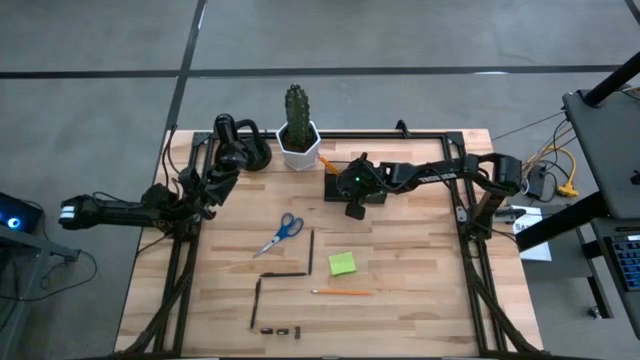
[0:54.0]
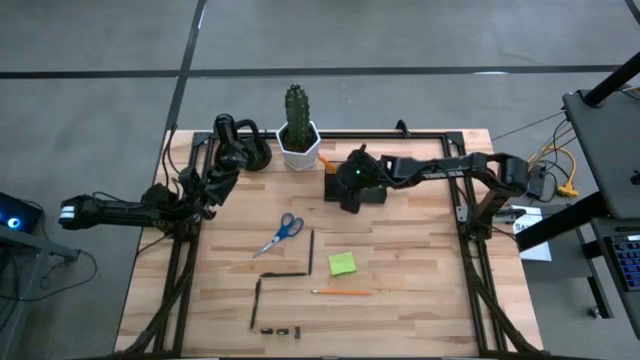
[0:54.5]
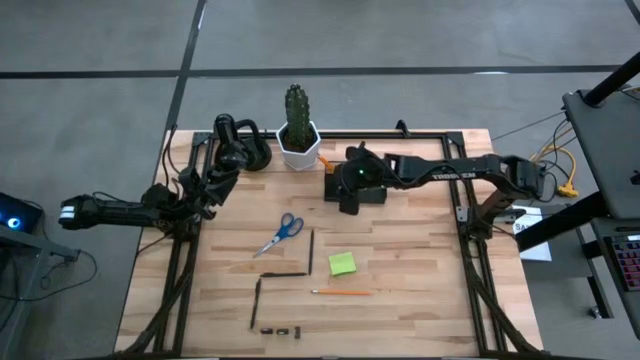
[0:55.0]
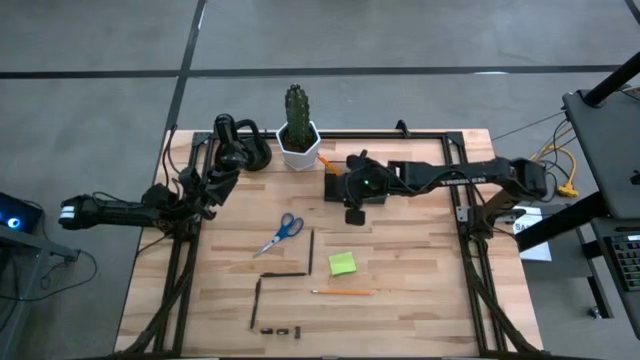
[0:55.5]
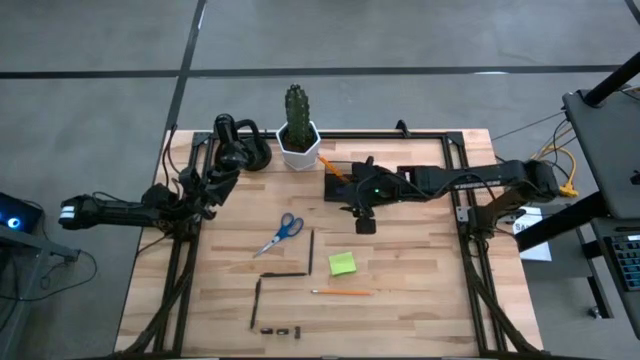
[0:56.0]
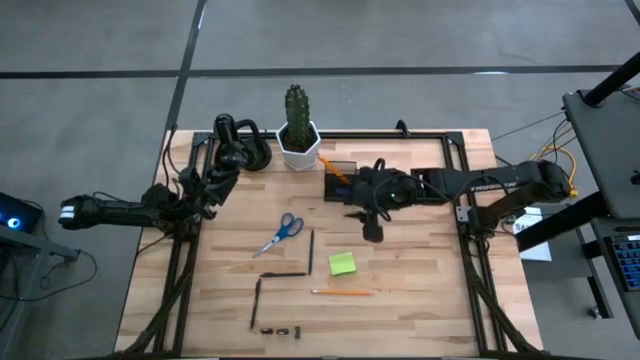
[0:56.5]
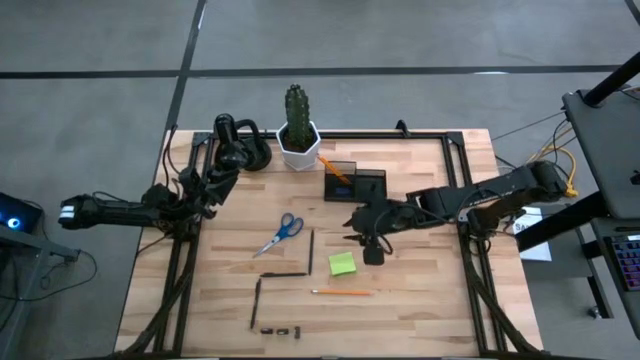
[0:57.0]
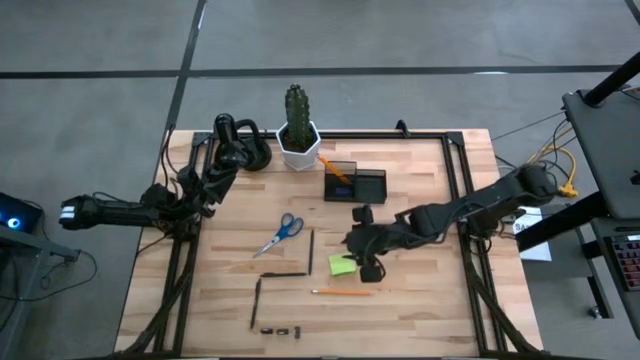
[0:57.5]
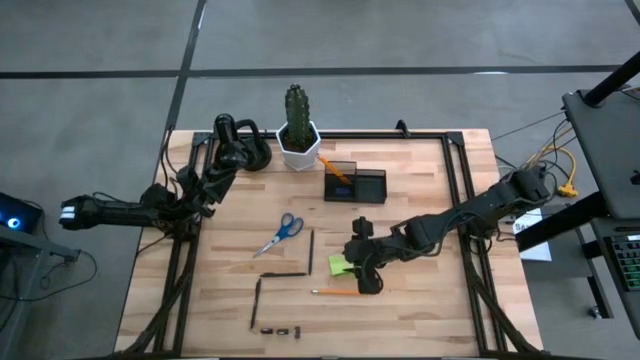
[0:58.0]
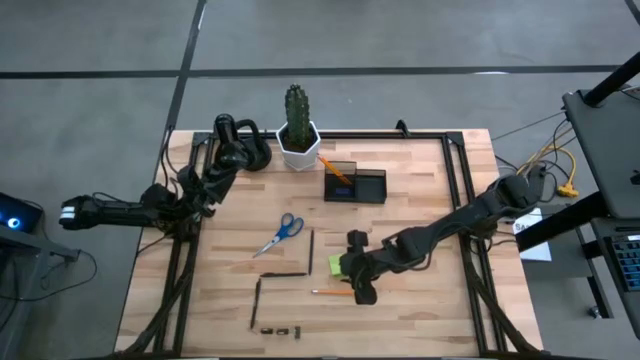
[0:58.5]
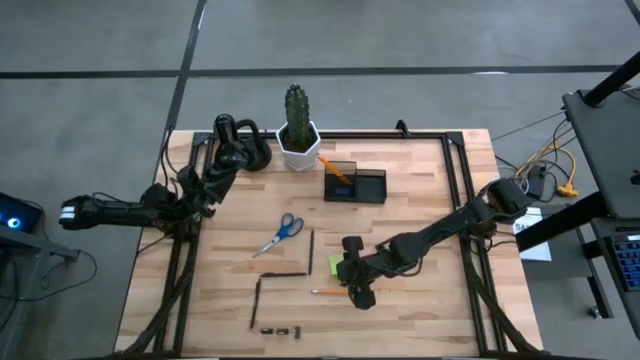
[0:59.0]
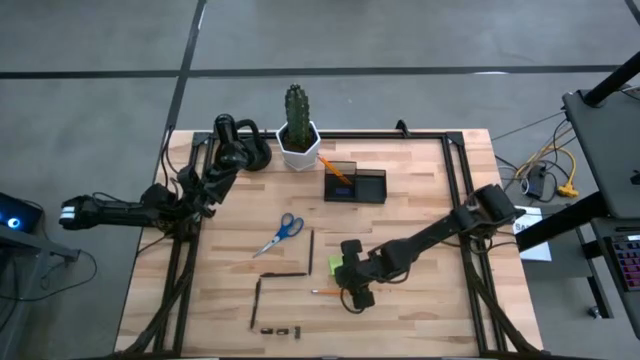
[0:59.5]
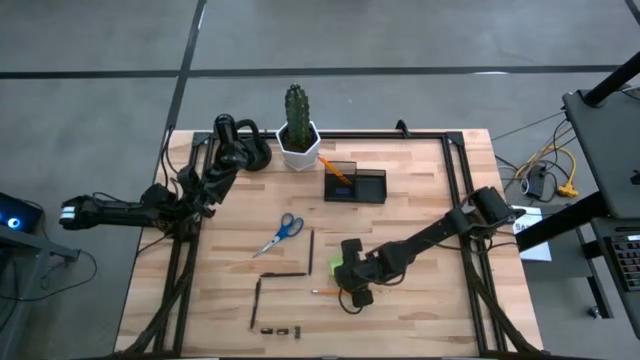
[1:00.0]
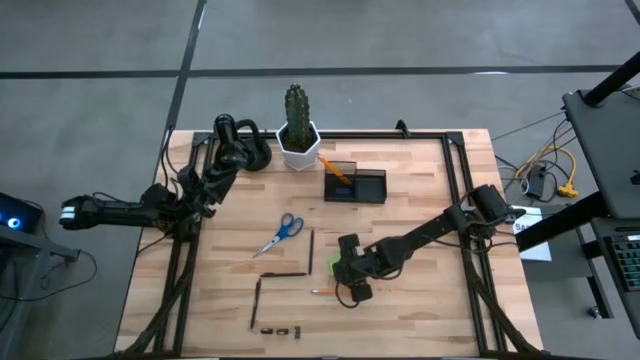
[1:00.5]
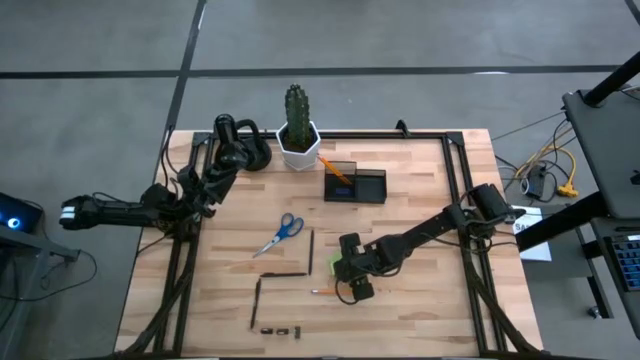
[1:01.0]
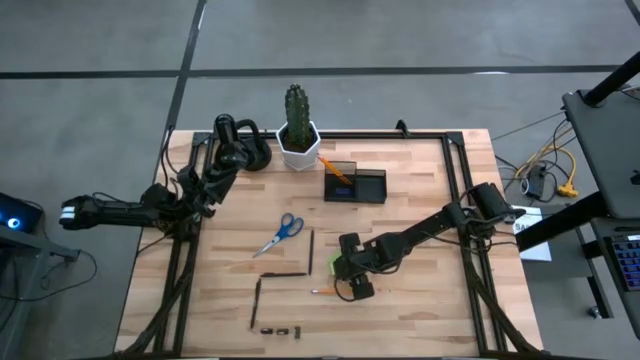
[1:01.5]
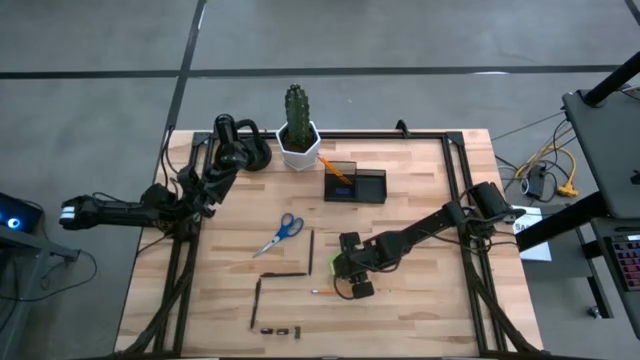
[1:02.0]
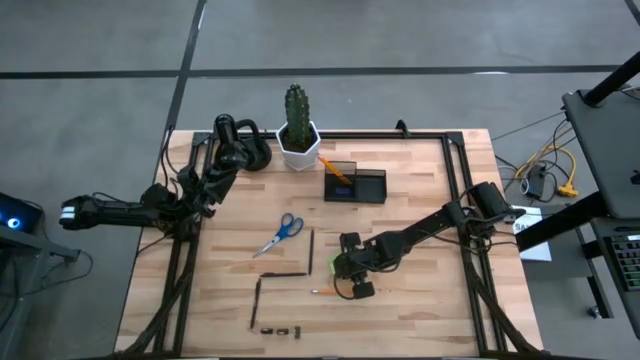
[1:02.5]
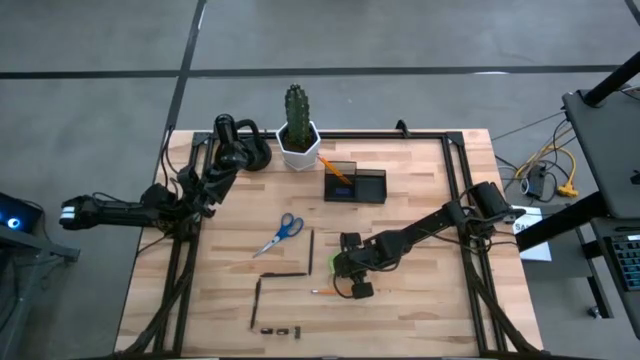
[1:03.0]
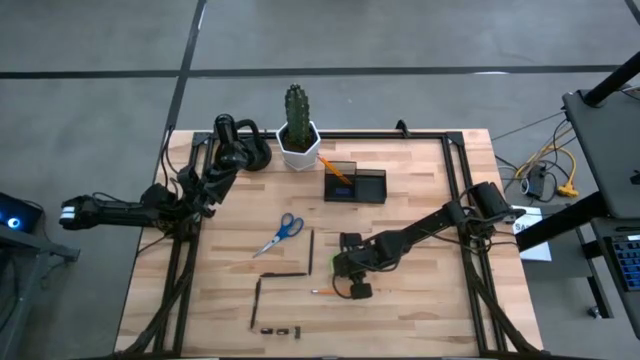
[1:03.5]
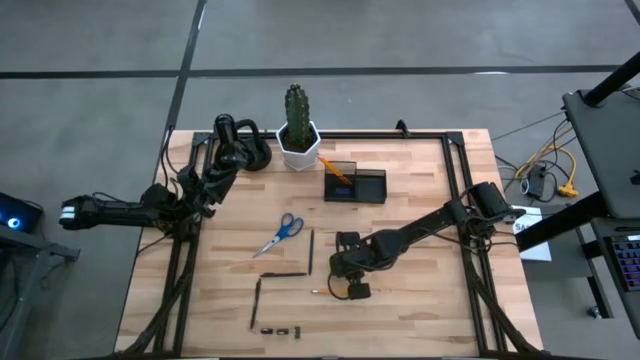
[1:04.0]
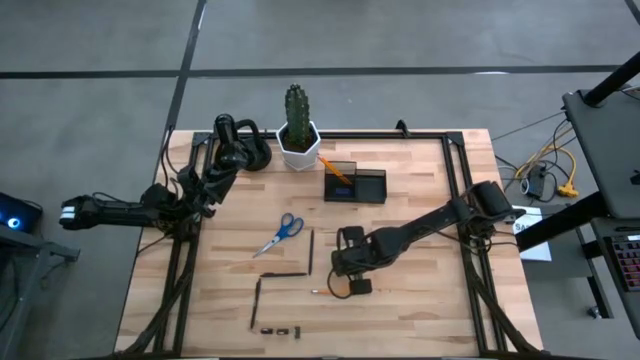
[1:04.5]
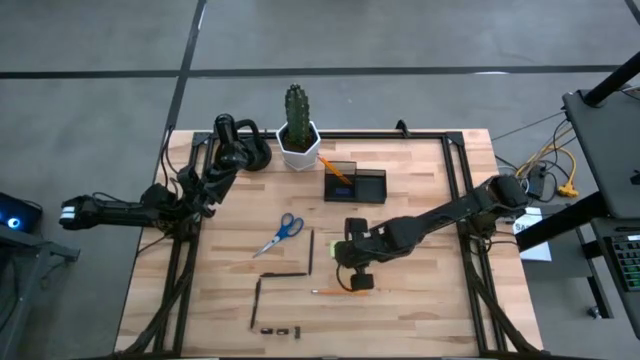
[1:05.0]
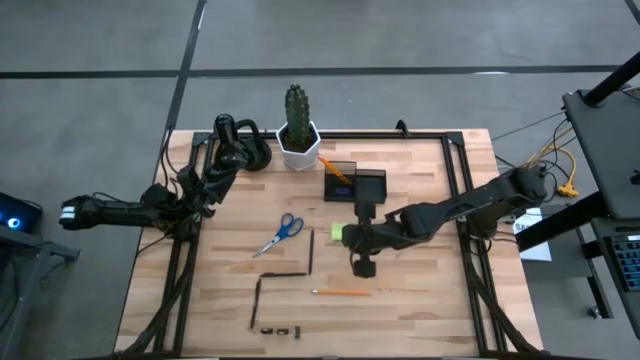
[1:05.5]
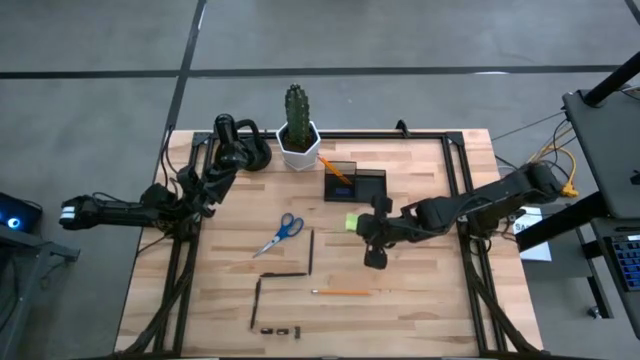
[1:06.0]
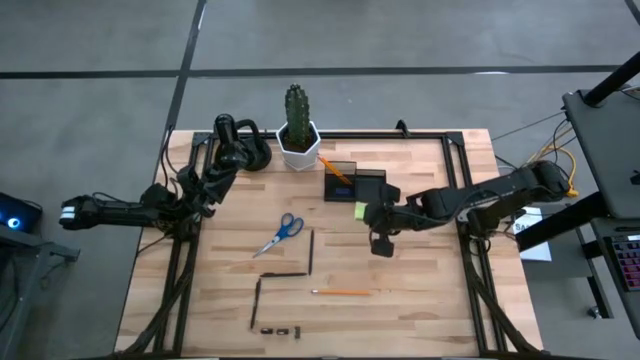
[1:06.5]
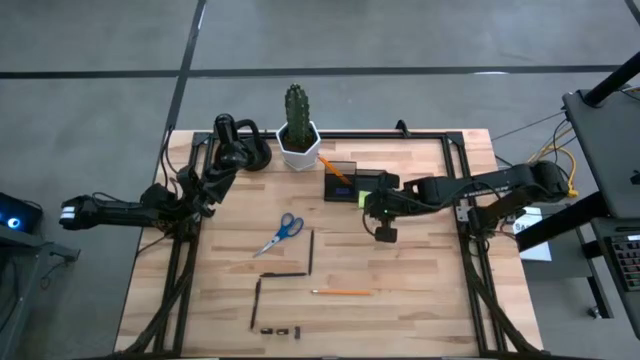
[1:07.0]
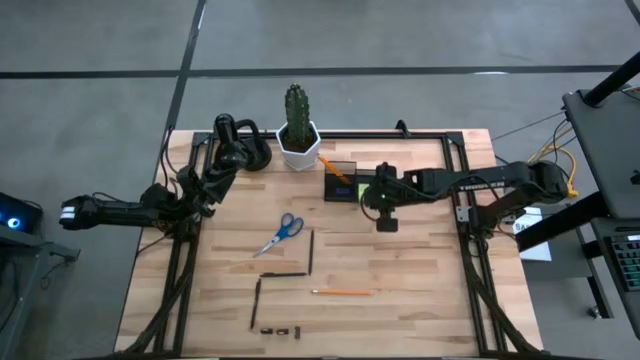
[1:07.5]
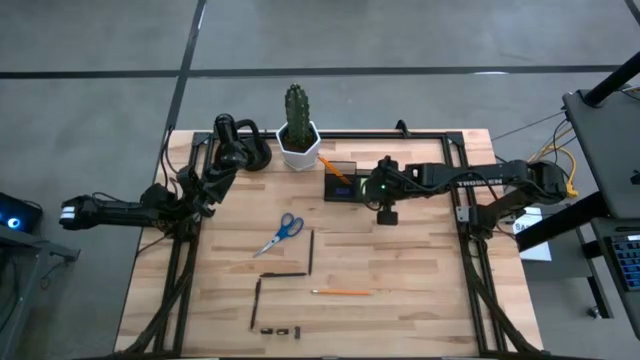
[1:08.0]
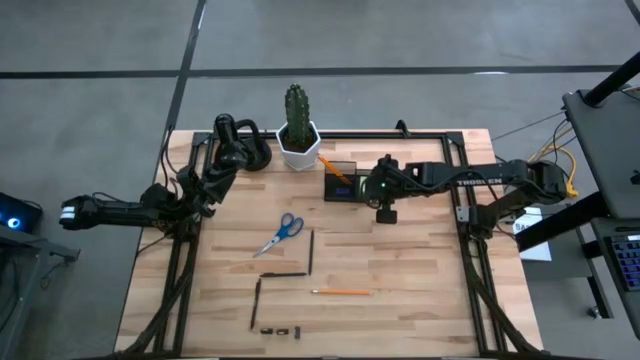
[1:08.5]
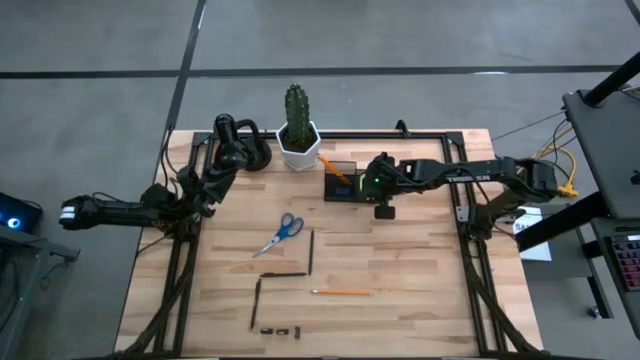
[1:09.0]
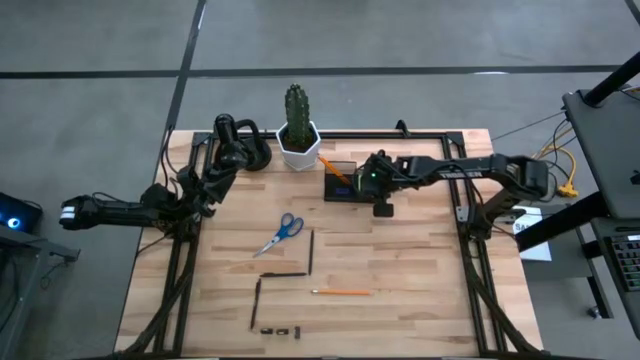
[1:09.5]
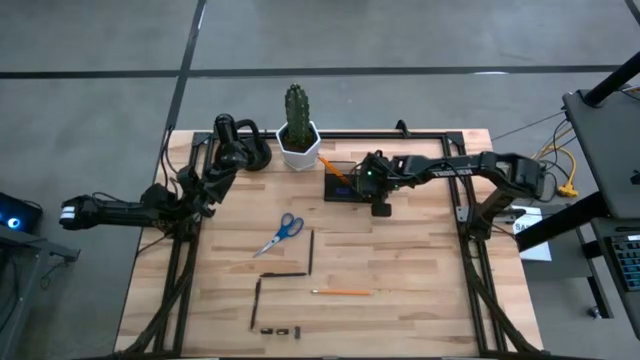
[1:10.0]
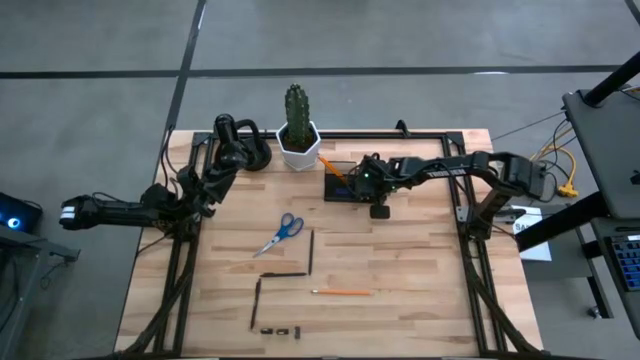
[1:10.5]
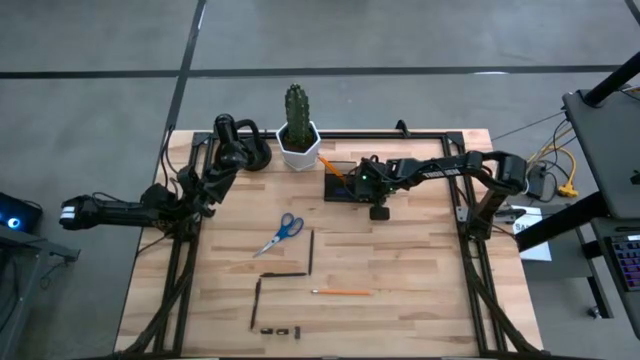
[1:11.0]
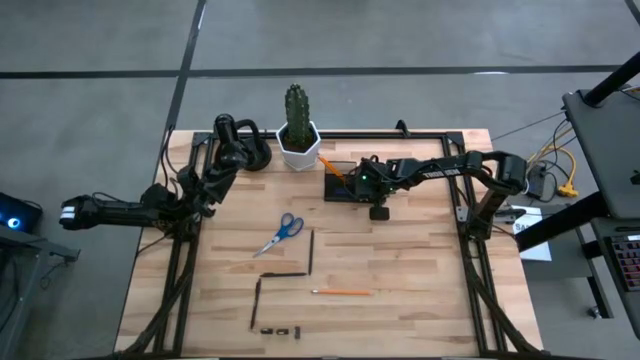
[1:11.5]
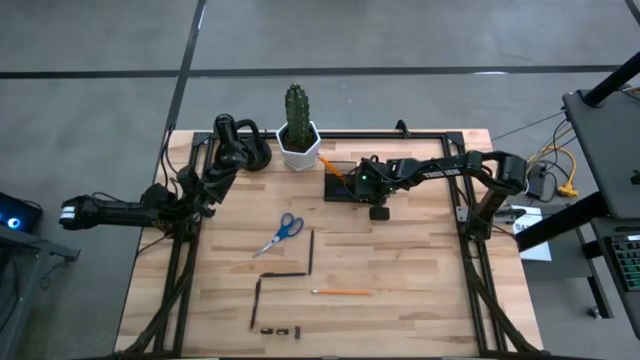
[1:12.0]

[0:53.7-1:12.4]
Task: Pick and place office supplies into organizer
Put the sticky note into the right section of the desk organizer

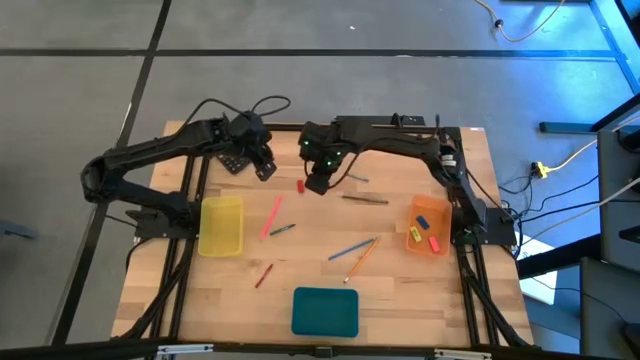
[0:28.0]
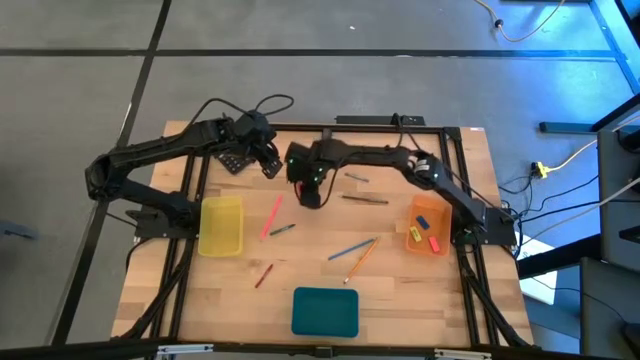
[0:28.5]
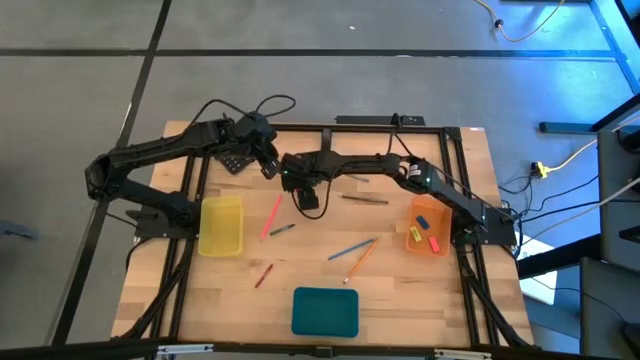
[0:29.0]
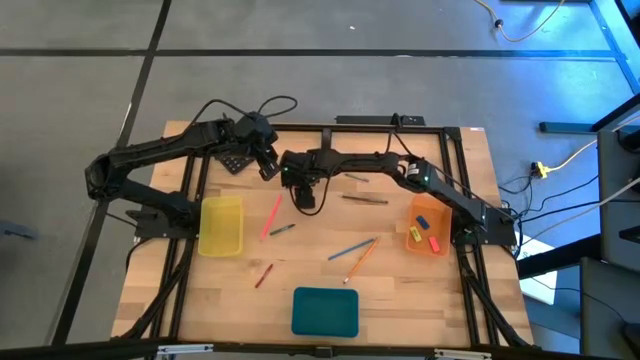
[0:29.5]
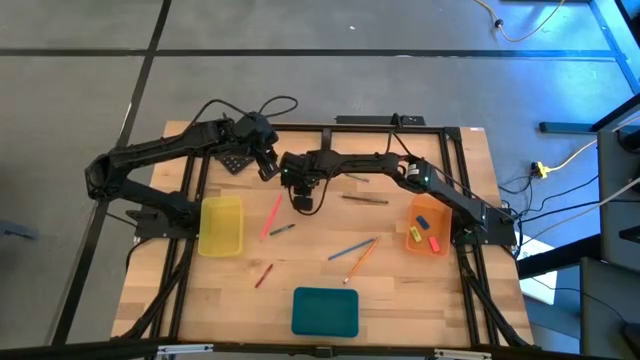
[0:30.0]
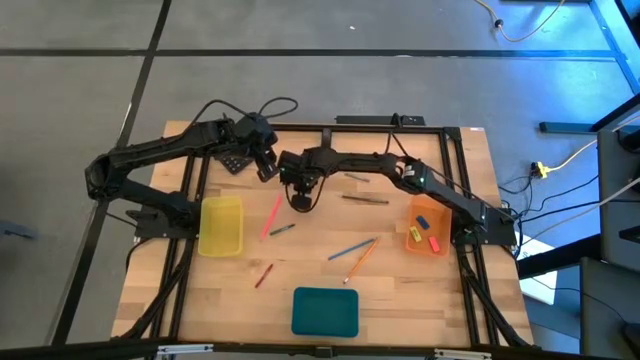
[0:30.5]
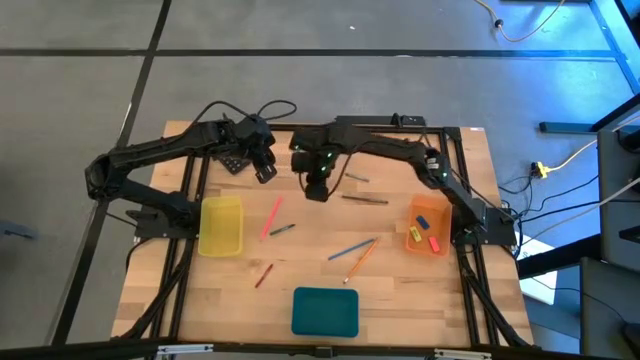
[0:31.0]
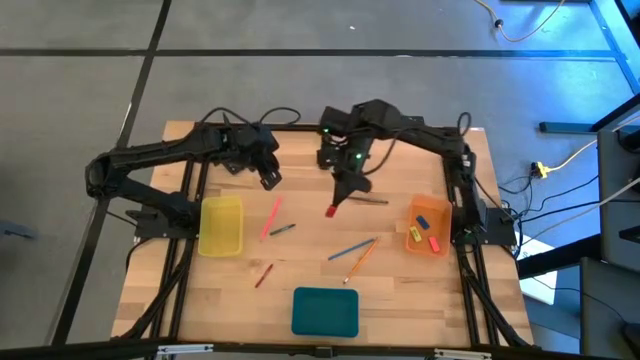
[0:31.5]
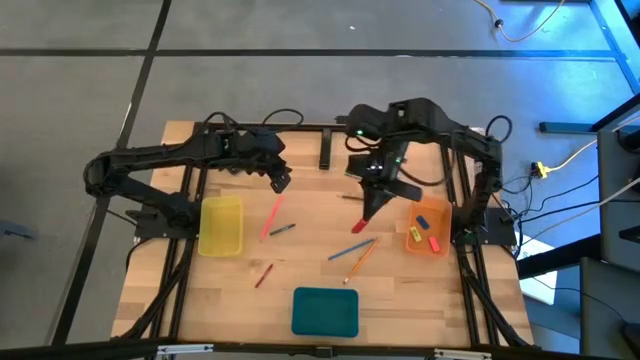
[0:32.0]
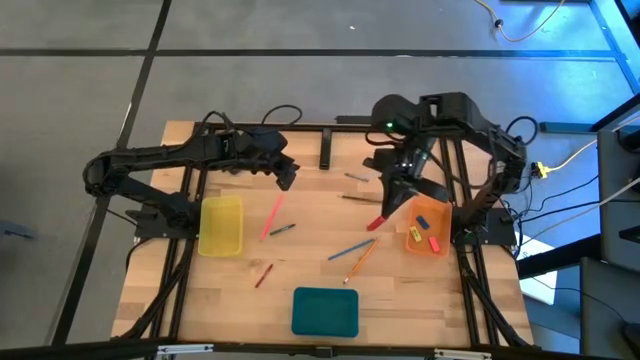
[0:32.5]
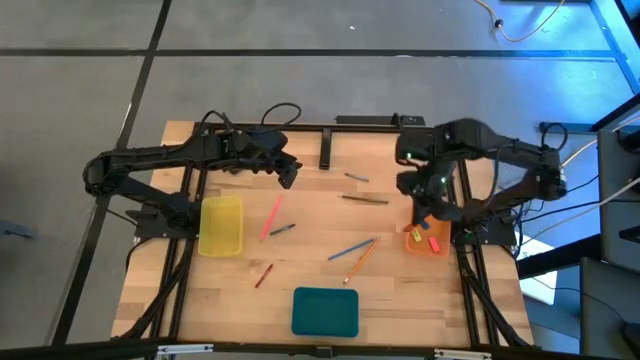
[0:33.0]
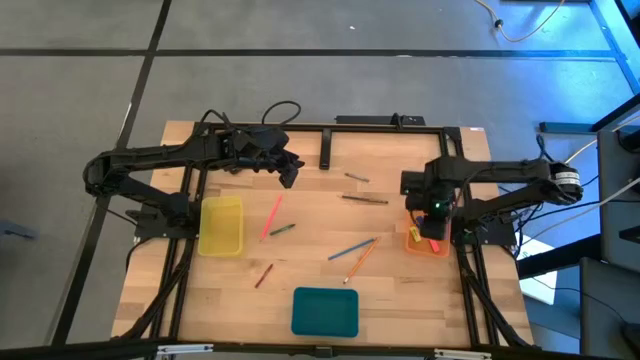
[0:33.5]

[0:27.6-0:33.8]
Task: Sort crayons/erasers/pens/pencils in bins
Put the red eraser into the orange bin
